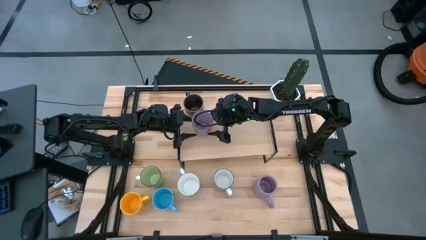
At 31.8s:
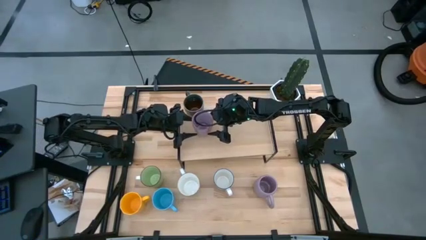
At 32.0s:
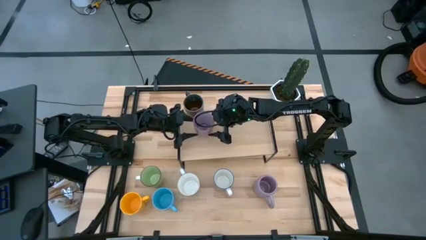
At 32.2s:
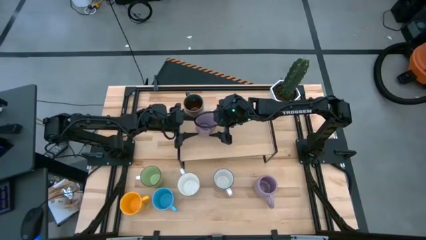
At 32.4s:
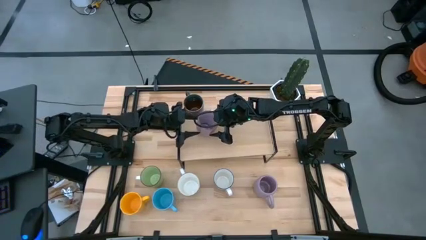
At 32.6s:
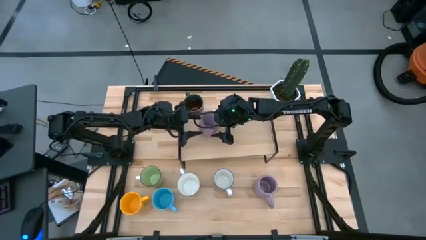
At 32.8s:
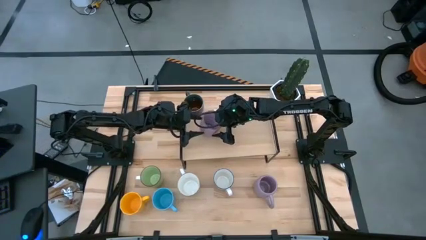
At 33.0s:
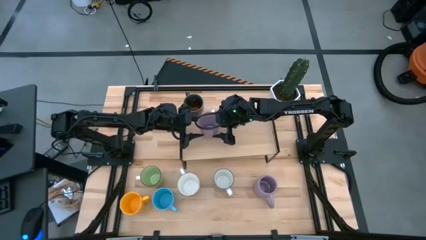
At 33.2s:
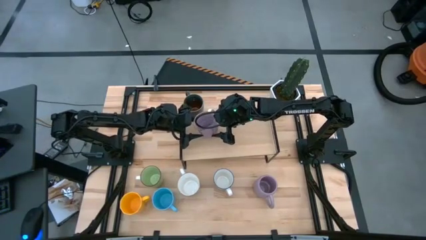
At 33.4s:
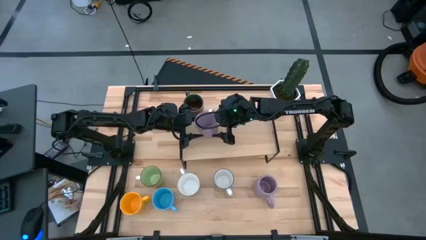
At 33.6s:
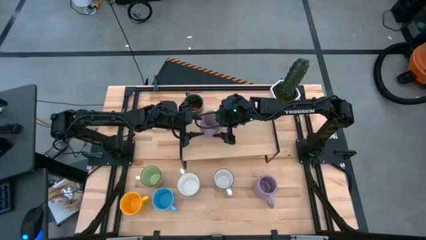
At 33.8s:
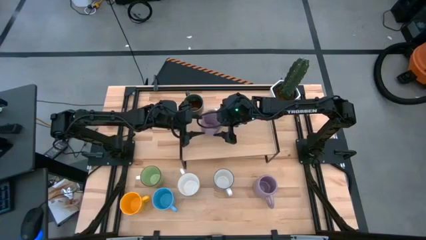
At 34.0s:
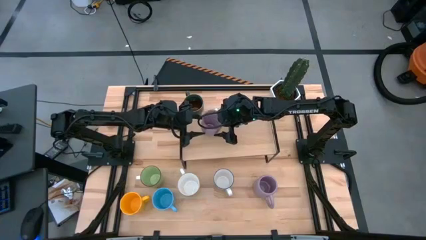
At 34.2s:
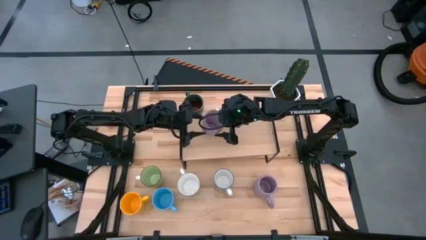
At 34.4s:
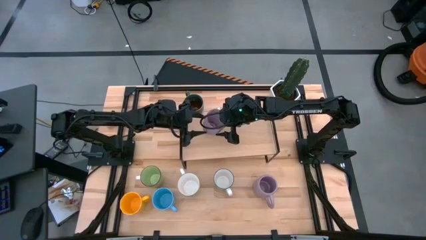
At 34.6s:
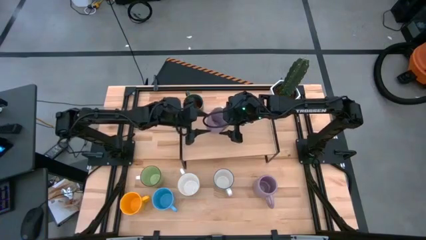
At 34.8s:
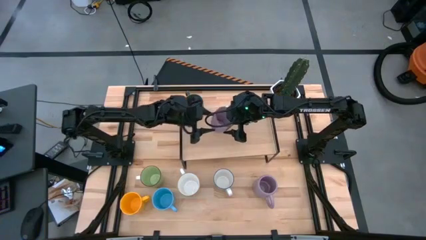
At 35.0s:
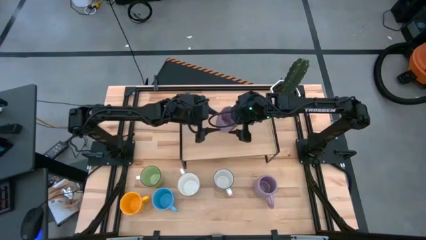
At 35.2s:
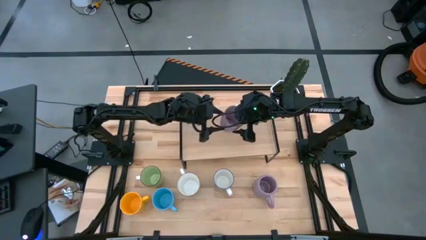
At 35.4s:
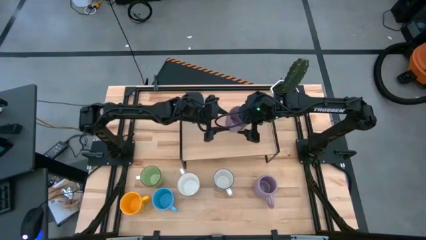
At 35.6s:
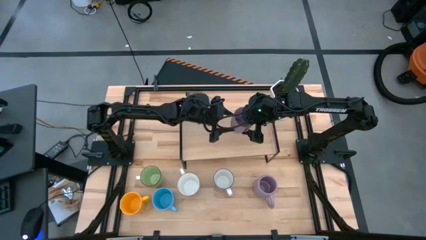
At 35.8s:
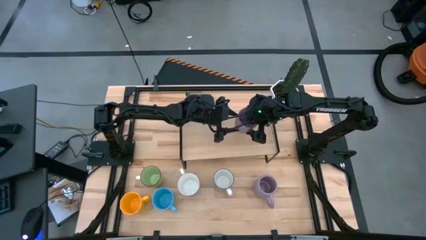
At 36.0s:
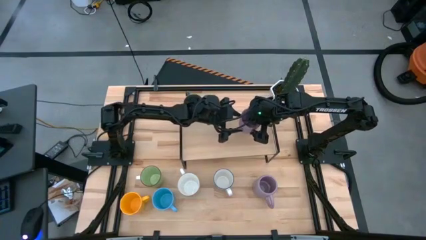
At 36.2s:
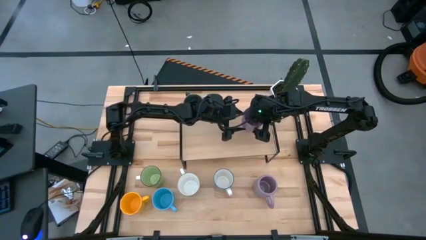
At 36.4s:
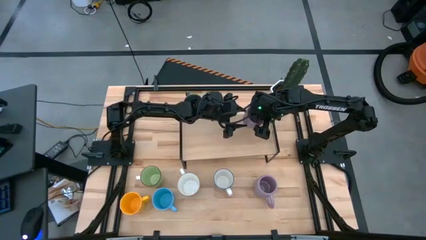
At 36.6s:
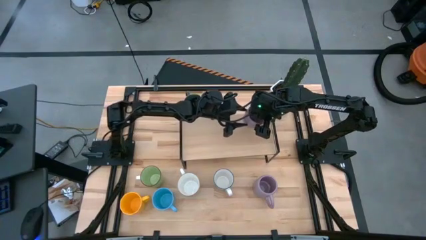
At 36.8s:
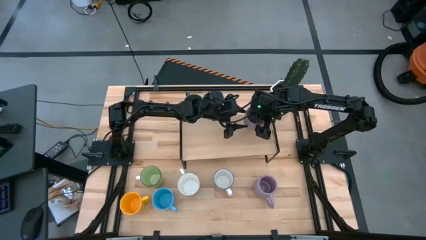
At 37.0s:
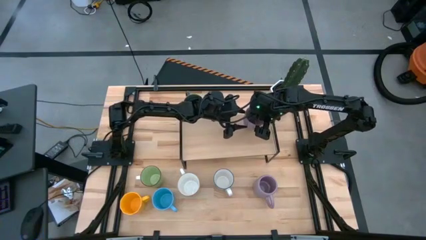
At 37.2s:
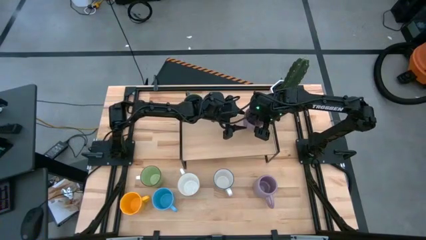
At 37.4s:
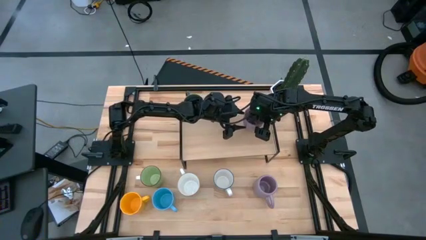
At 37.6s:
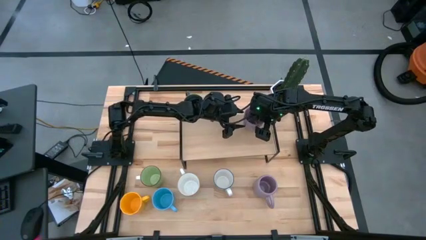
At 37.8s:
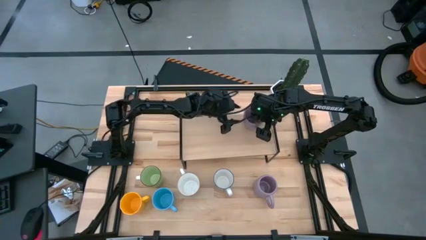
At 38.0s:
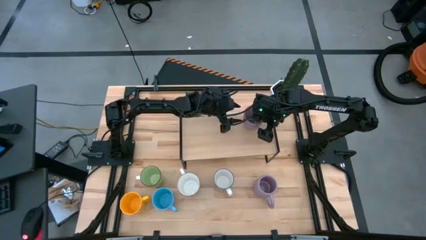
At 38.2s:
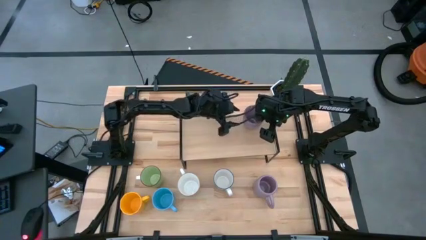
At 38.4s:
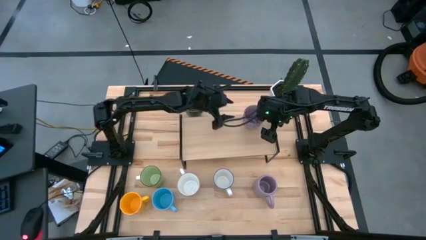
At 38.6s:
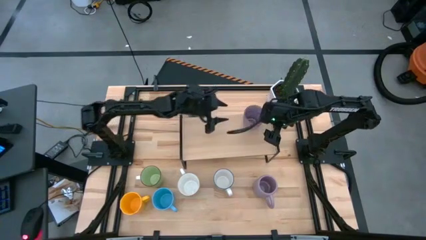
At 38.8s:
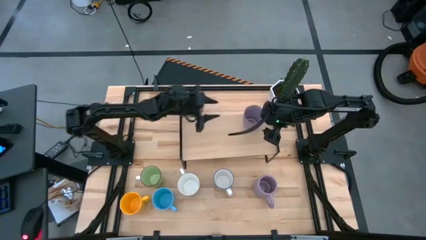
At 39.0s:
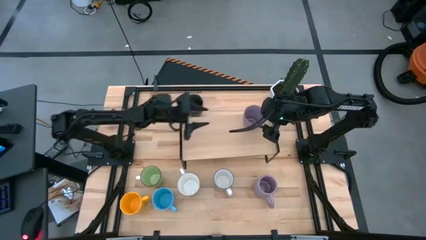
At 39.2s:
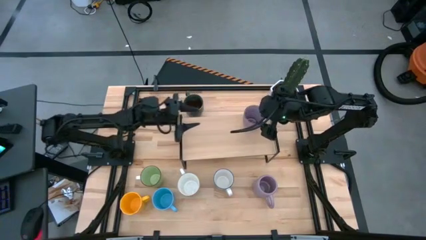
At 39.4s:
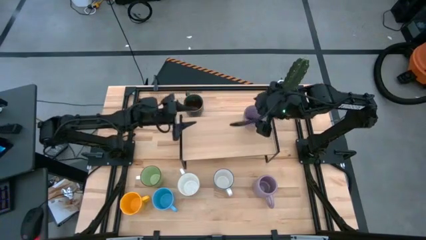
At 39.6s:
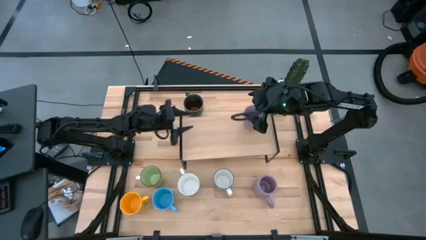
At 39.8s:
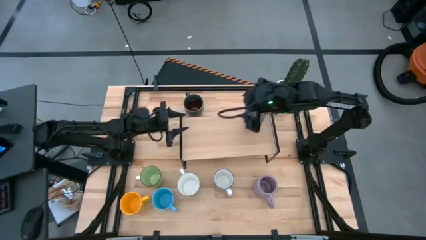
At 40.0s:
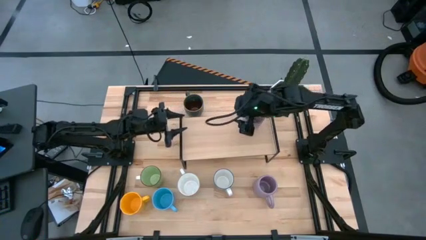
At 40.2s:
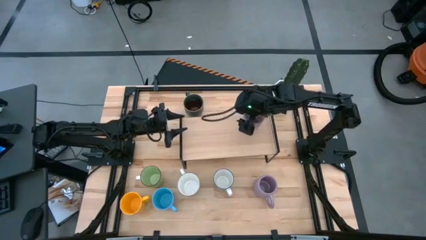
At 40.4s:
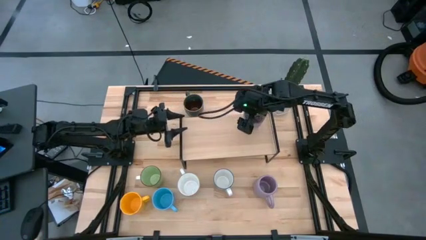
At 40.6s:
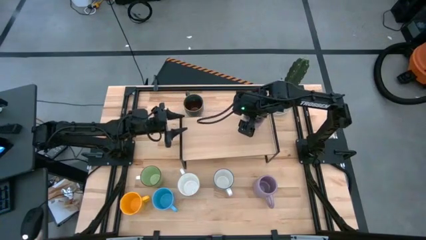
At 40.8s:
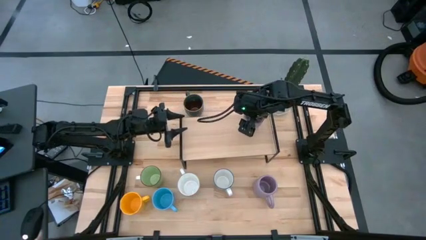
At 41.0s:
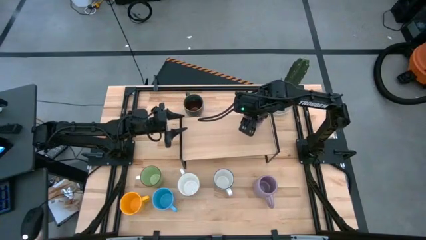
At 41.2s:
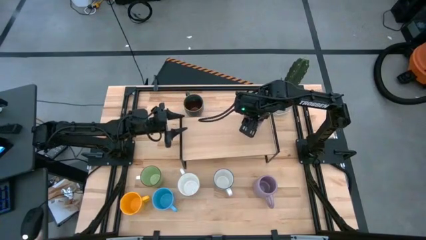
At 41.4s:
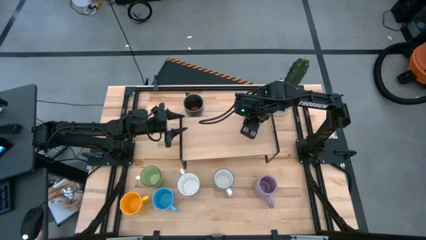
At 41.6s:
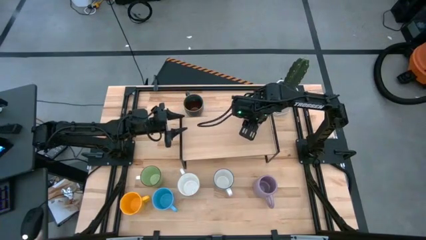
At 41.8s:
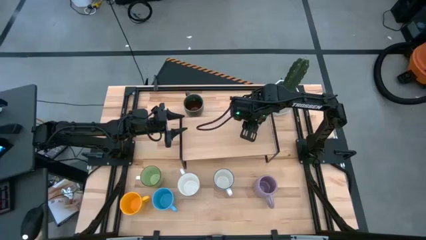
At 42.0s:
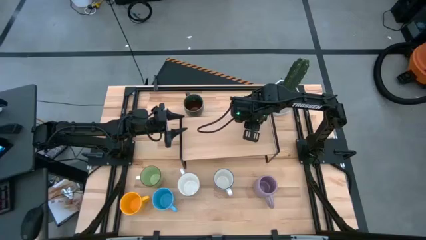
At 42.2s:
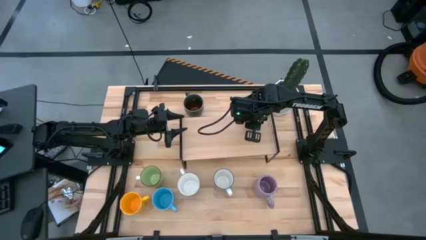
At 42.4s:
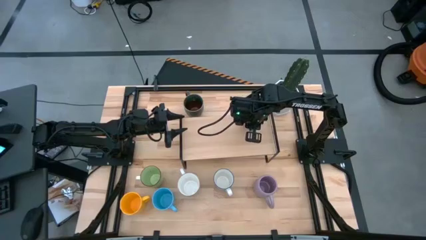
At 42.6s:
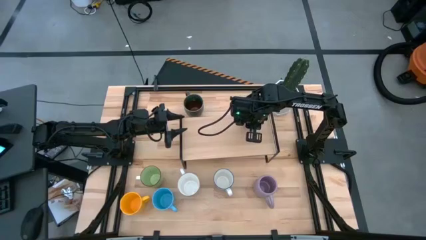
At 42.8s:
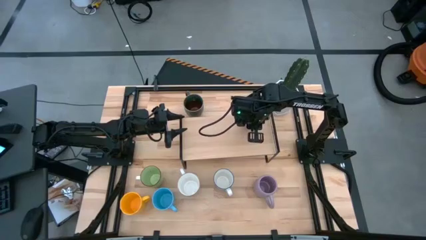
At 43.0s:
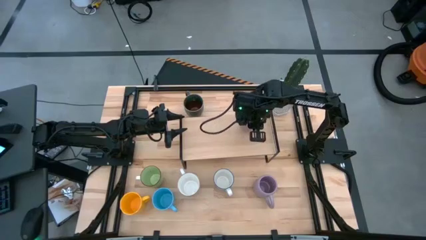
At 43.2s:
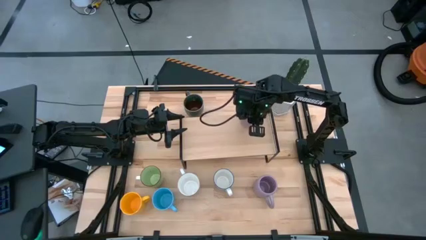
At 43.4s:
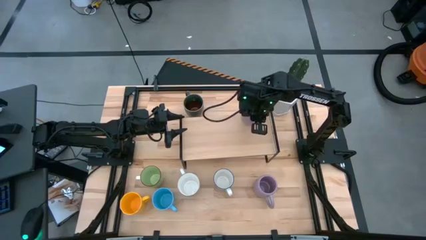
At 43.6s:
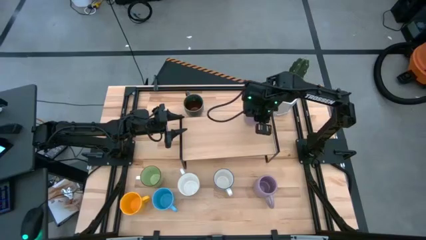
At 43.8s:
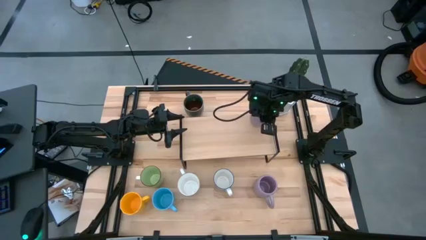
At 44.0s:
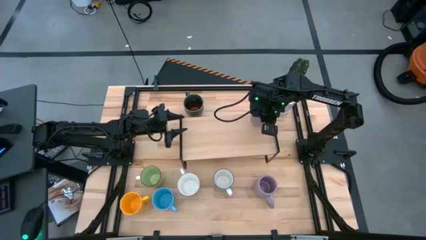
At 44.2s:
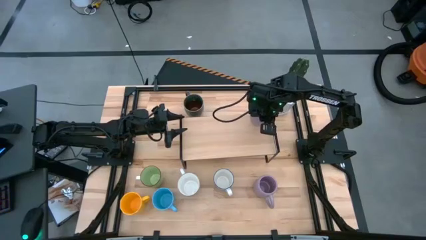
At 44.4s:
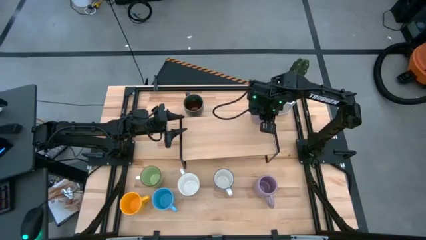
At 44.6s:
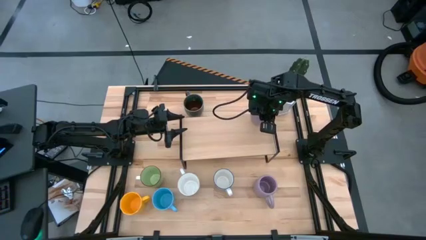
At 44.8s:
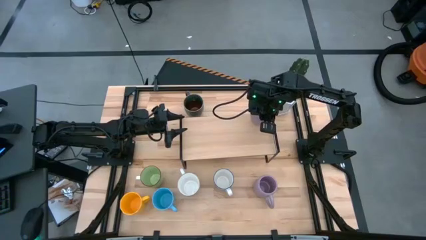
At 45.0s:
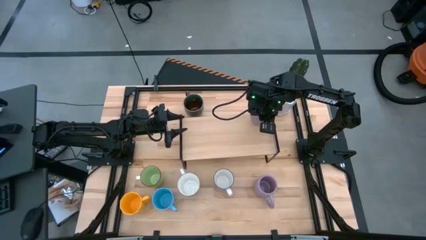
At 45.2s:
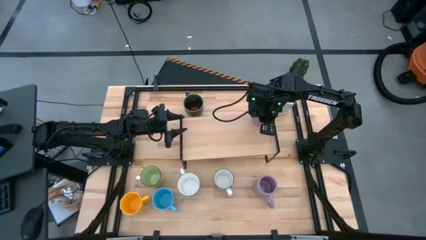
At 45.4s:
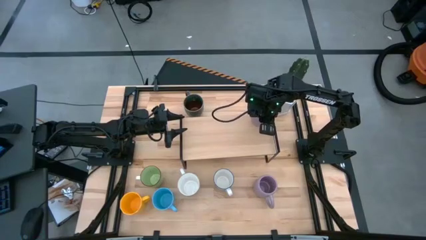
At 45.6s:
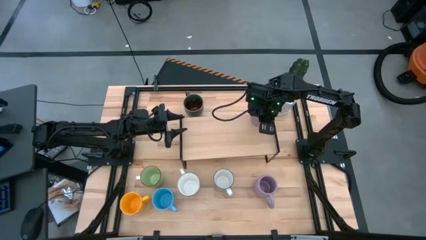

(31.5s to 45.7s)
Task: Place coffee mugs
Put the top purple mug on the shelf

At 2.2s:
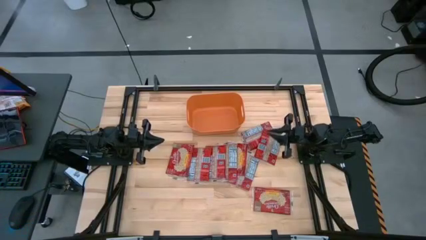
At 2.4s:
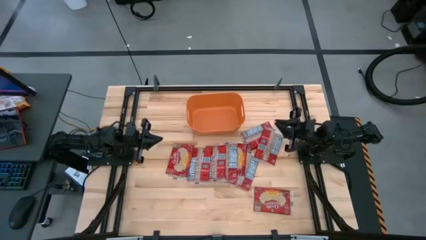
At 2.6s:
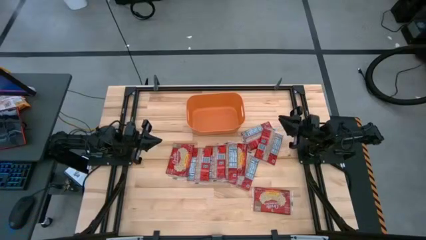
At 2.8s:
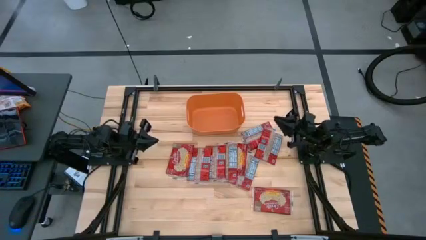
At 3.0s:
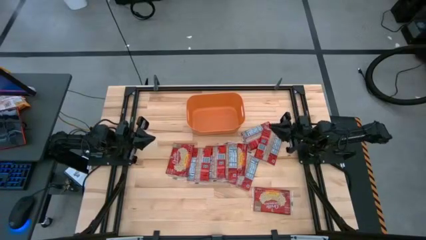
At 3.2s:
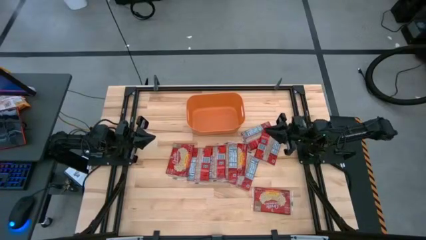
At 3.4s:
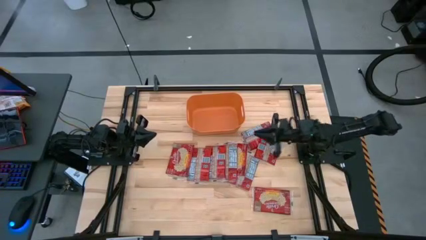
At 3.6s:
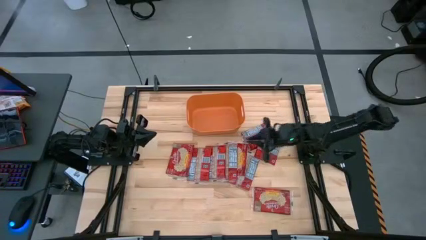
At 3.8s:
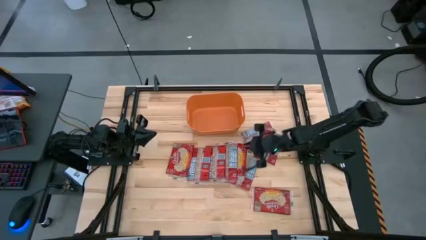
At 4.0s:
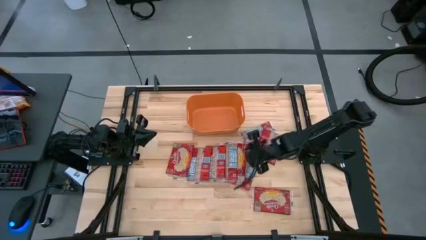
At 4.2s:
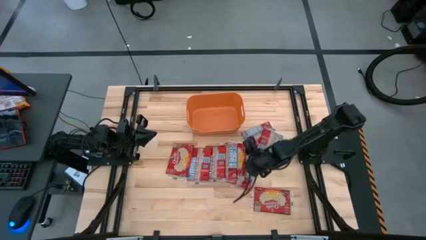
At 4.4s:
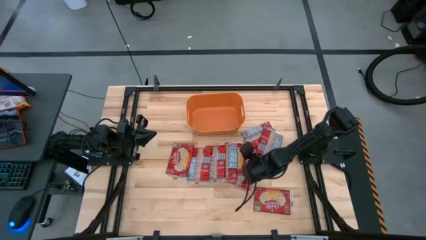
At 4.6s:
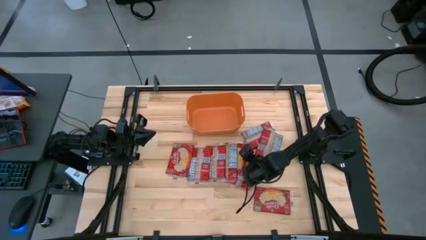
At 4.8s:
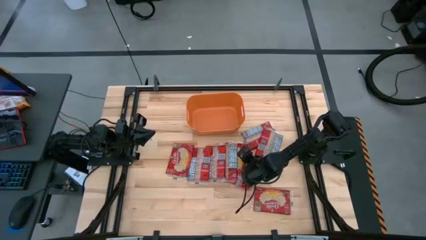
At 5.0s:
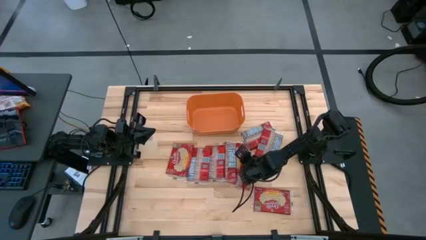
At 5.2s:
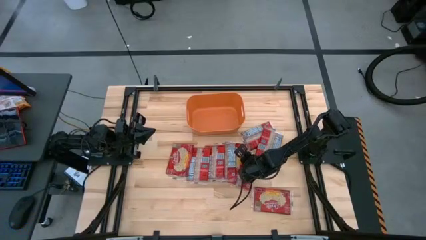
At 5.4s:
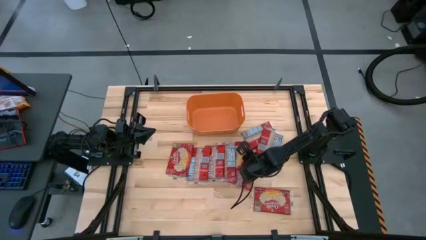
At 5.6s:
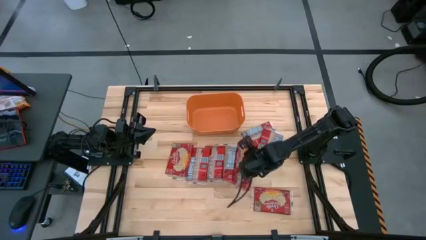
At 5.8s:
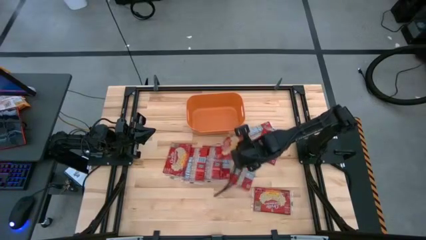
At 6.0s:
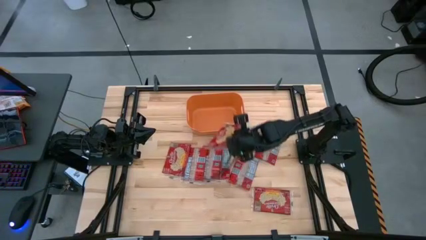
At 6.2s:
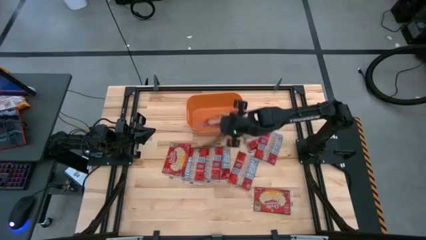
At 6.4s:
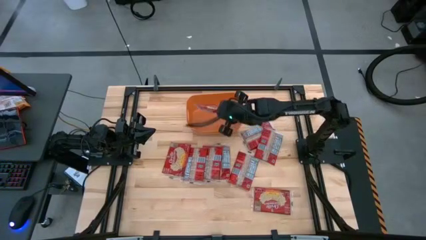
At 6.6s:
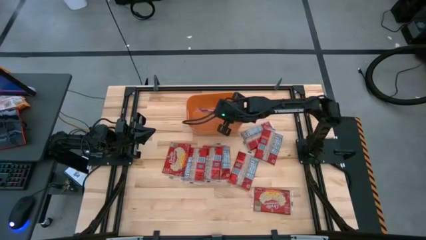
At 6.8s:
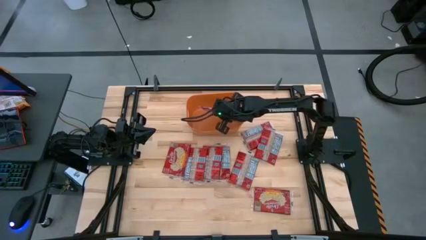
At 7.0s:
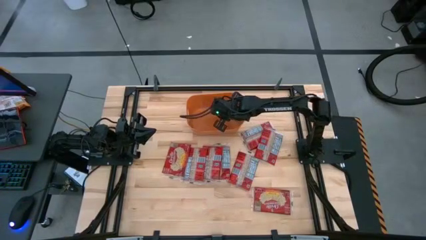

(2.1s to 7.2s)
Task: Sort popcorn bags into baskets
Put the red popcorn bag into the orange bin
